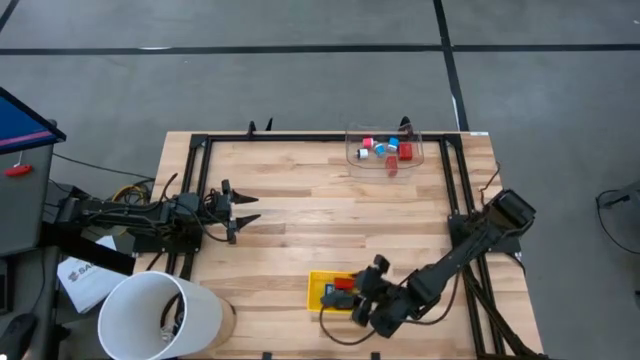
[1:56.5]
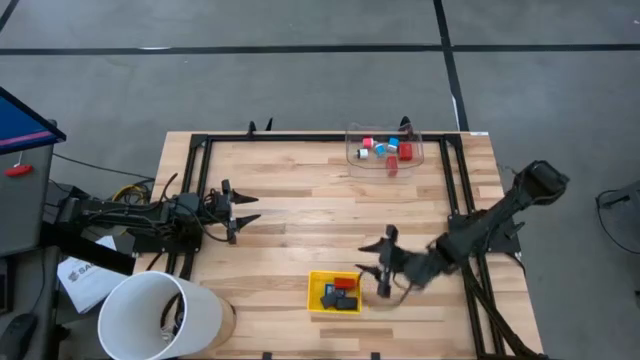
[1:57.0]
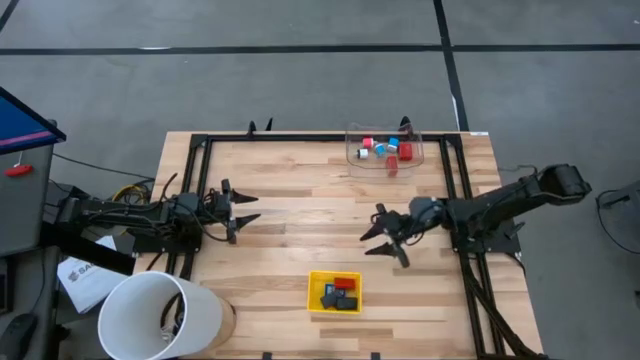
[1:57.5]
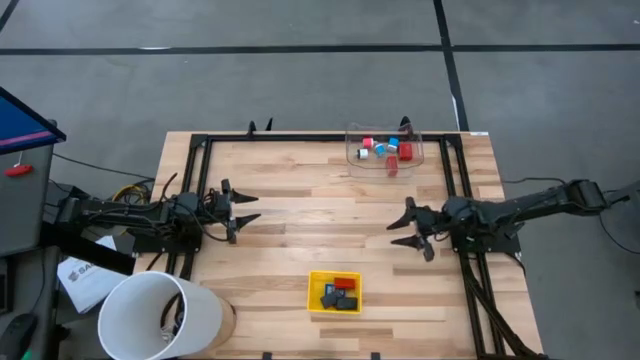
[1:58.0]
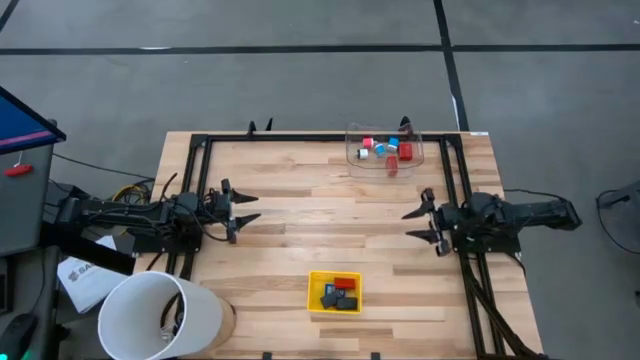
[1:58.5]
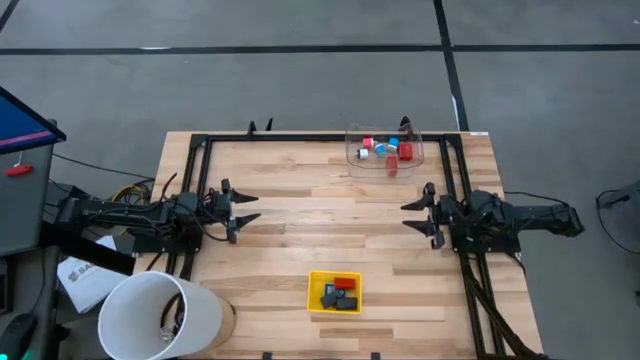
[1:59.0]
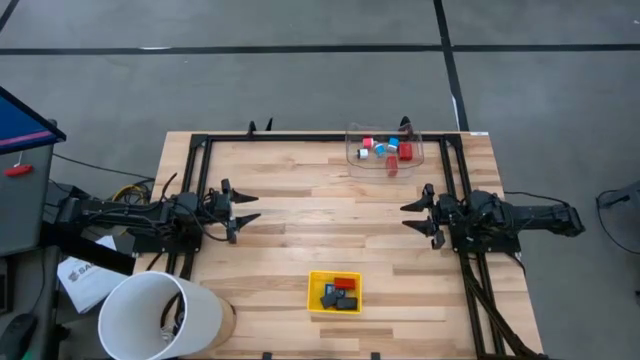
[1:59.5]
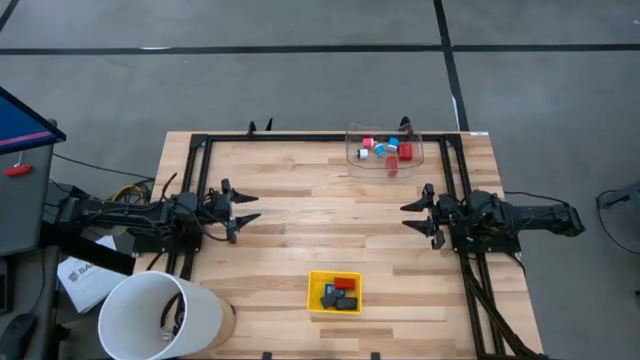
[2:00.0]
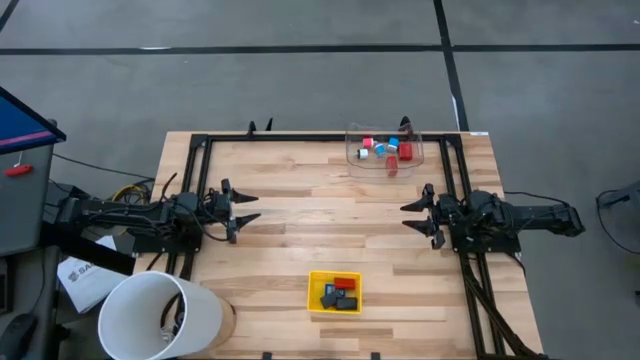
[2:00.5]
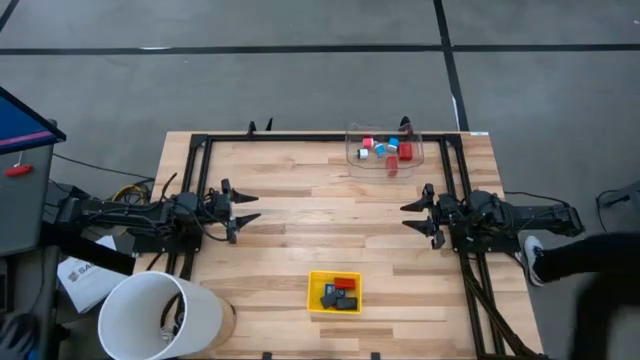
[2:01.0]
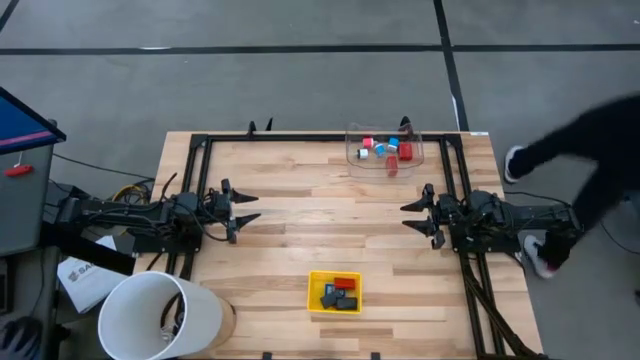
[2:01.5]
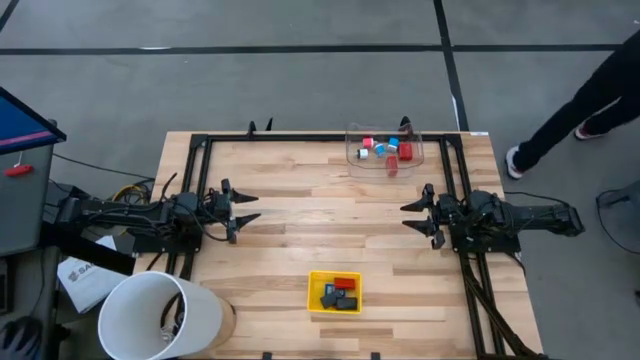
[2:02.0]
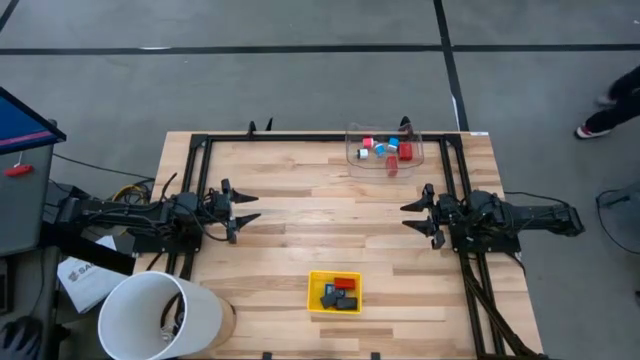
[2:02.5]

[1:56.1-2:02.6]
Task: Pick & Place Office items
Return to Home Position

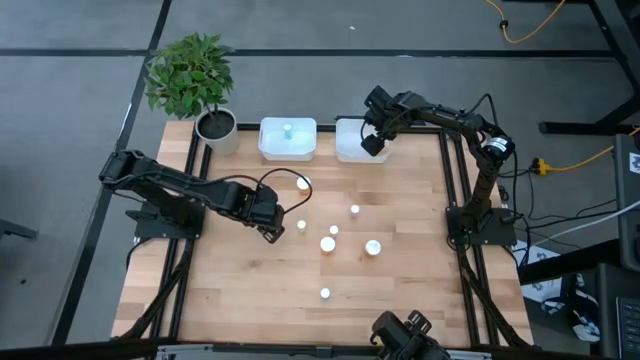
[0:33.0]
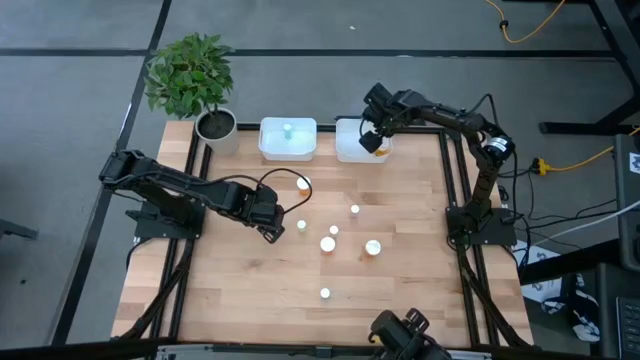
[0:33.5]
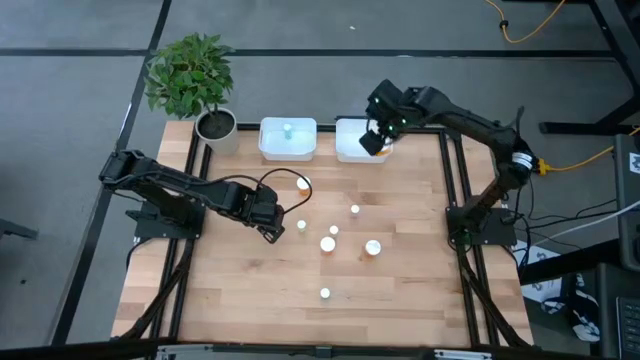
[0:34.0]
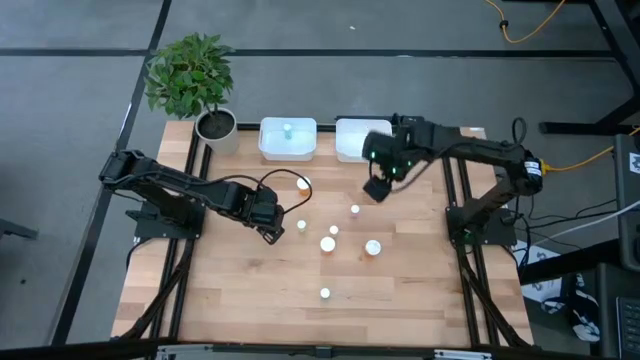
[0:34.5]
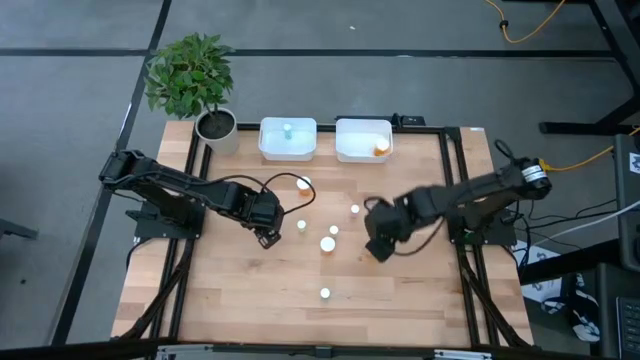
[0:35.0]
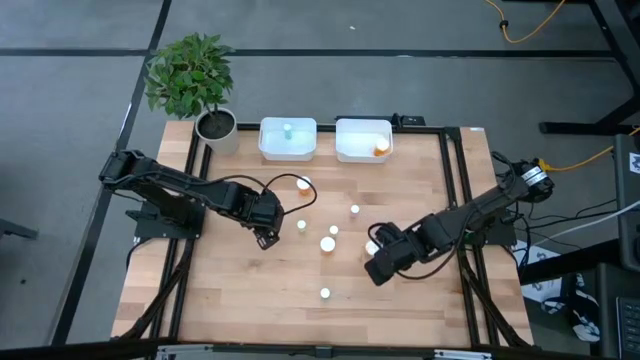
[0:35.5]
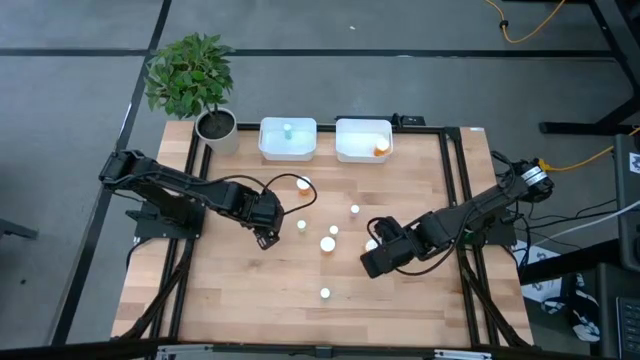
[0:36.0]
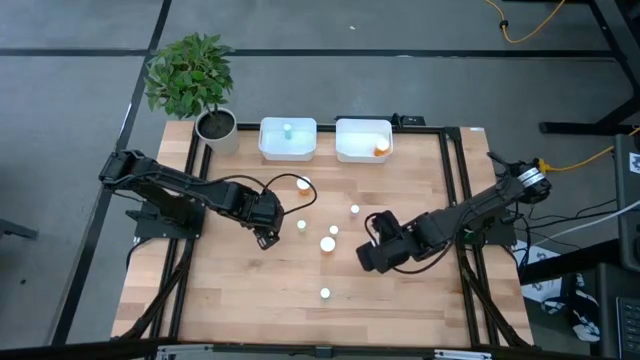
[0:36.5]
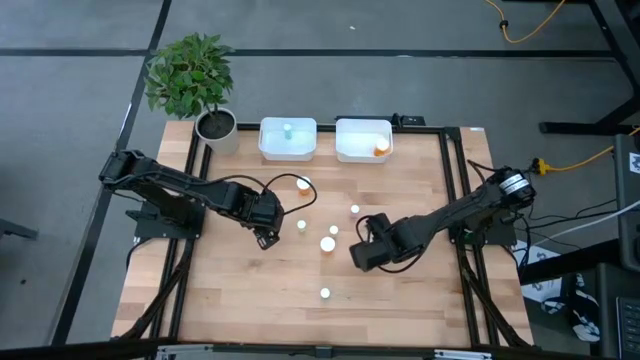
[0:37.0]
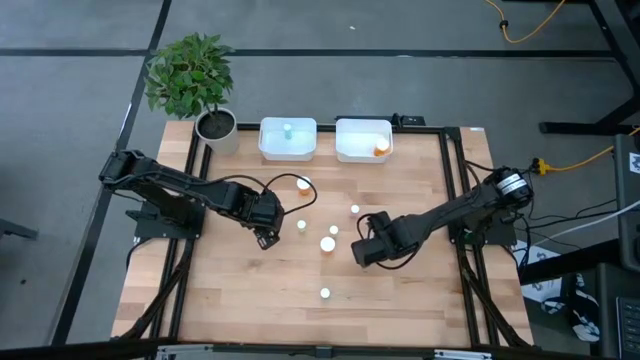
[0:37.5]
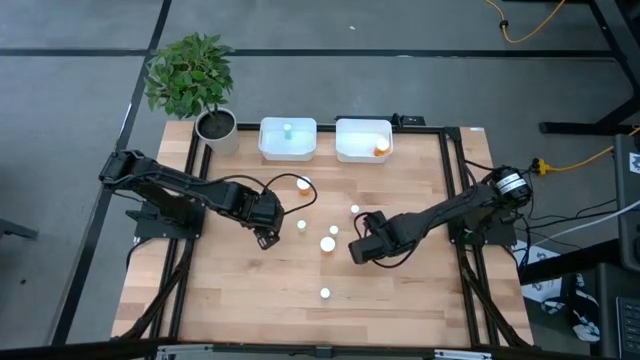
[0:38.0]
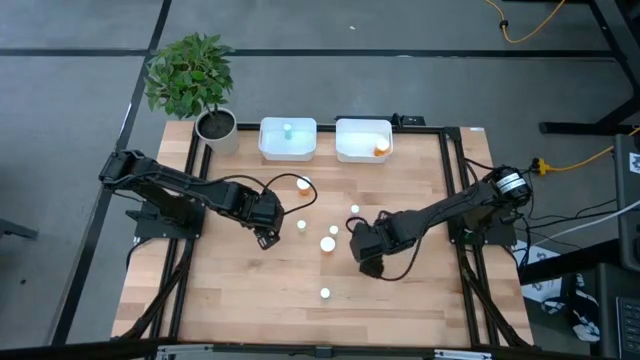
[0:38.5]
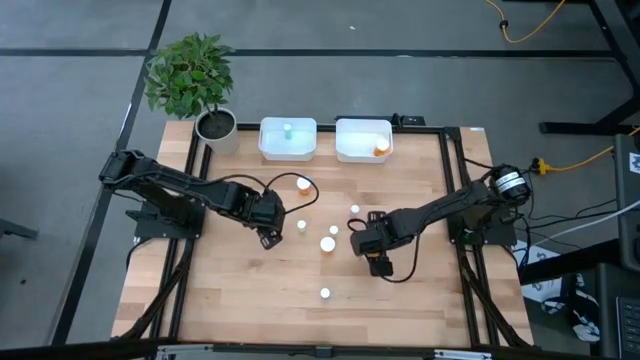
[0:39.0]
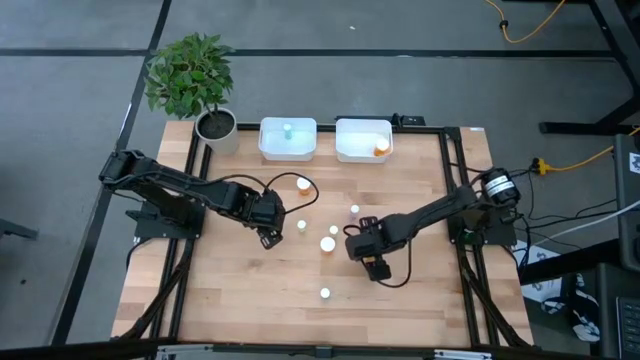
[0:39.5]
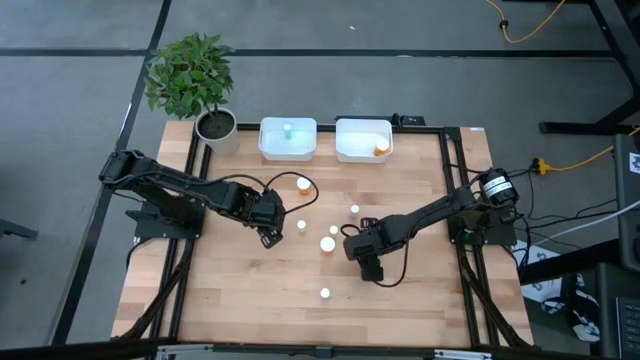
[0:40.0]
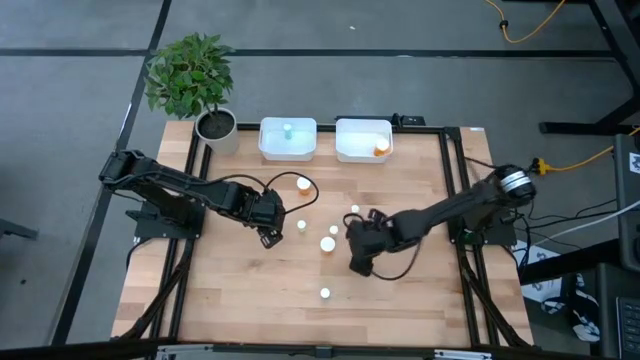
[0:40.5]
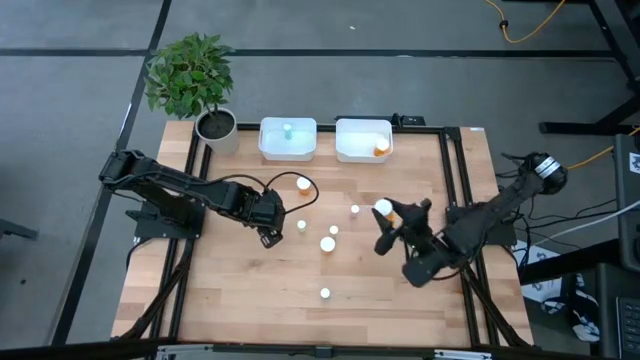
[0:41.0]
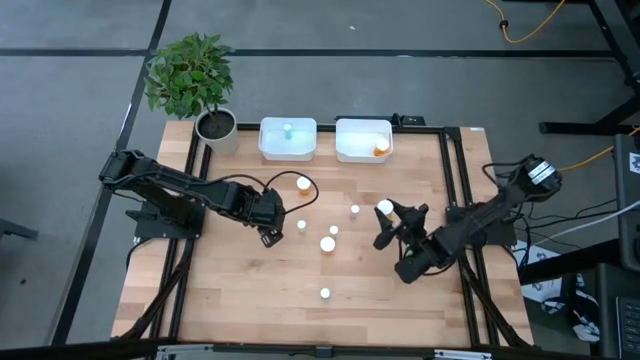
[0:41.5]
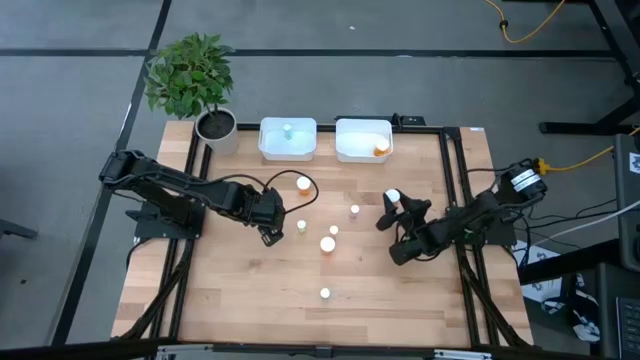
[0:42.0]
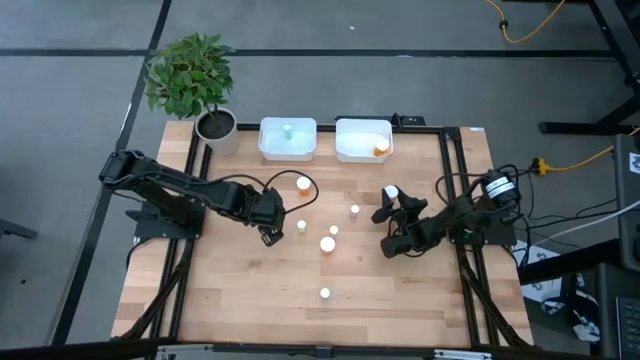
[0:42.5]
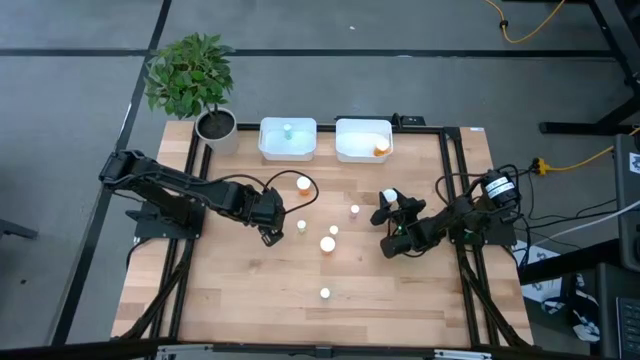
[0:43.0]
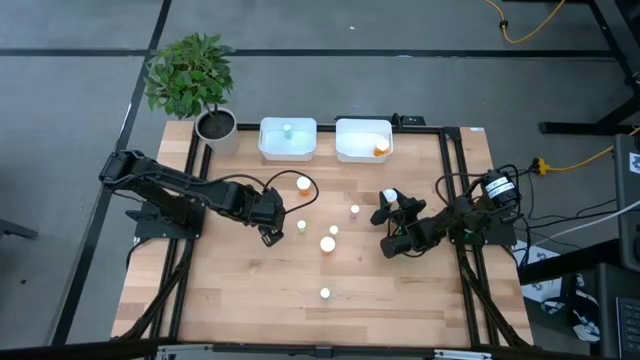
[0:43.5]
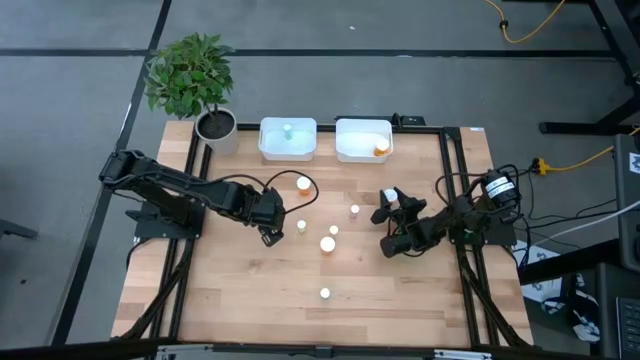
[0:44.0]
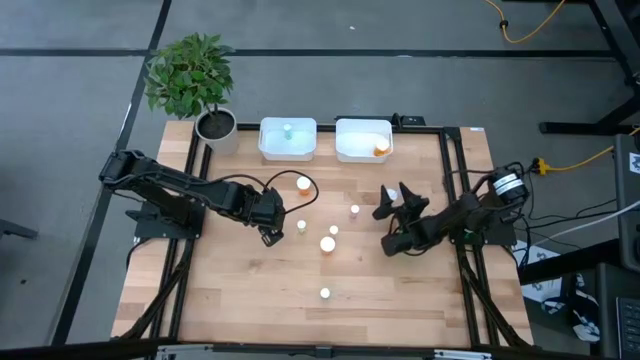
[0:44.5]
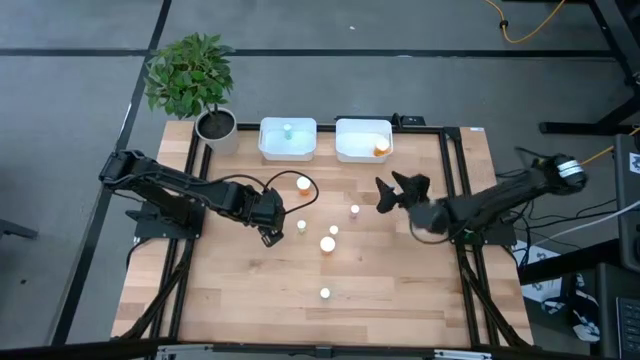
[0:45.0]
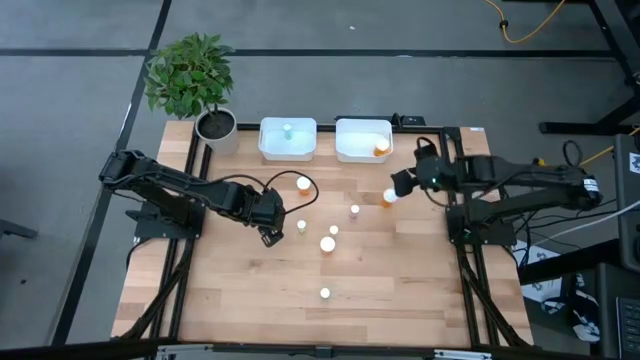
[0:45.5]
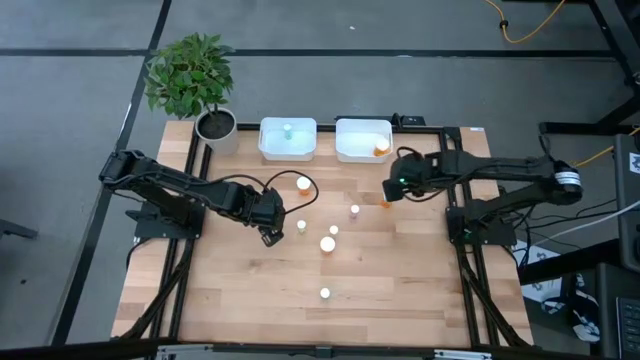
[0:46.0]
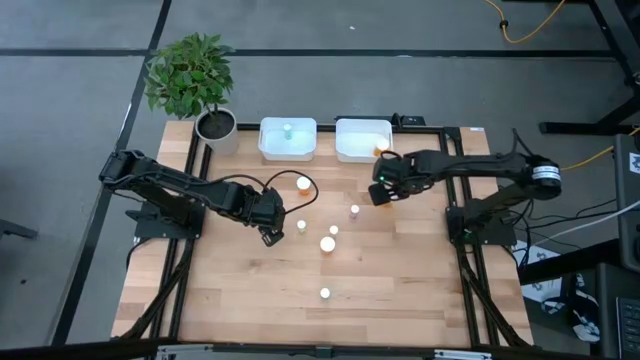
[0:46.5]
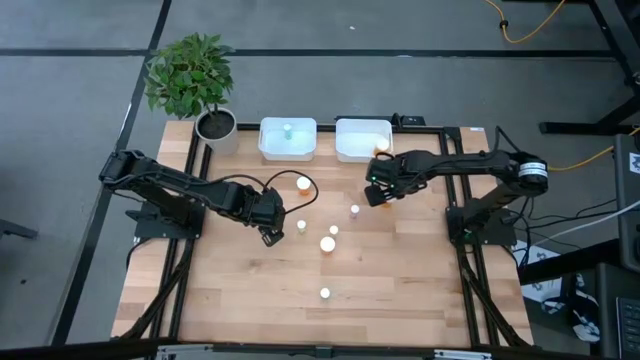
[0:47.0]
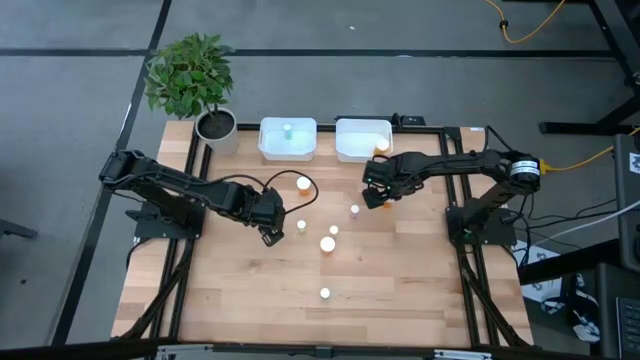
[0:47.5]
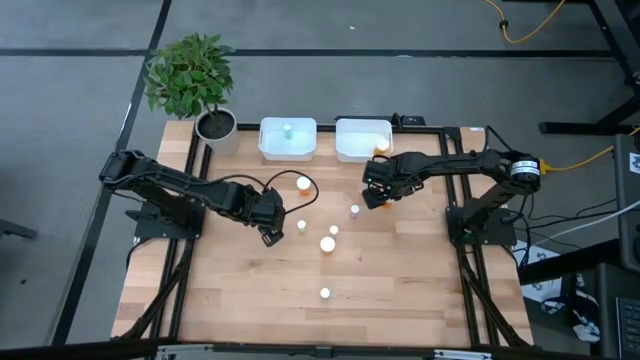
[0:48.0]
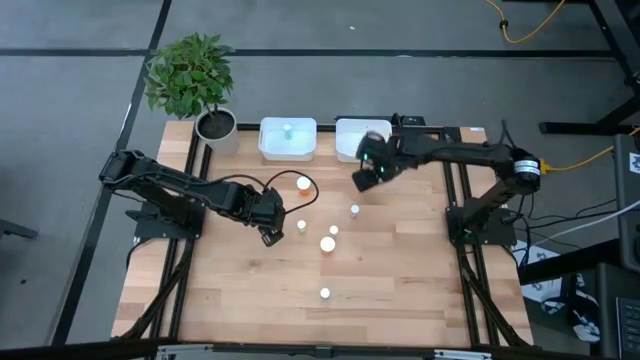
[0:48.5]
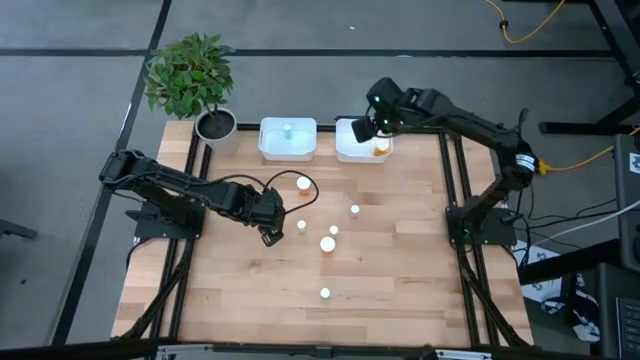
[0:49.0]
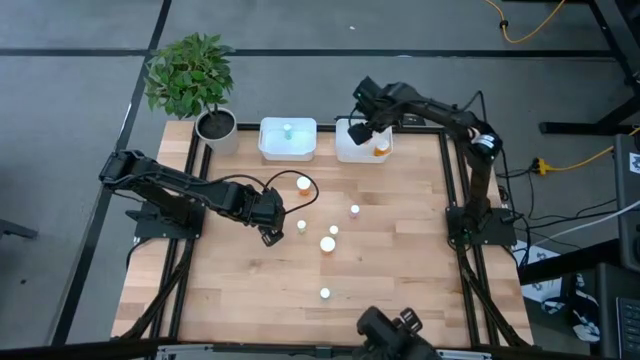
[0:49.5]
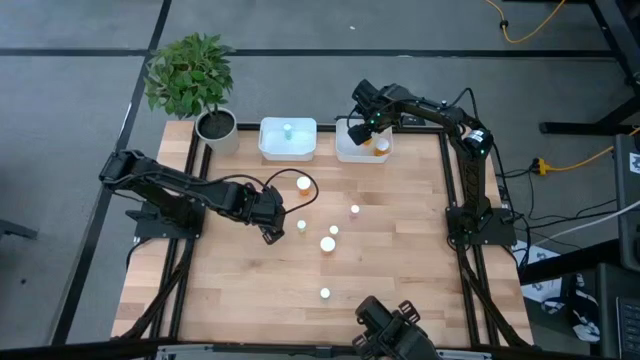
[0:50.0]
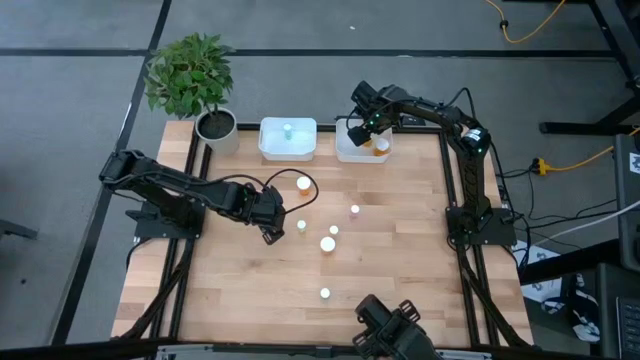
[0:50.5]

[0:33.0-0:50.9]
Task: Pick and place medicine bottles into bin by pill shape (circle, oval)
Put the bottom right orange capsule bottle into the right white bin
